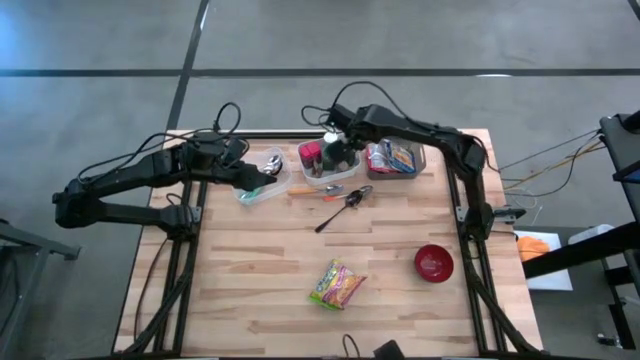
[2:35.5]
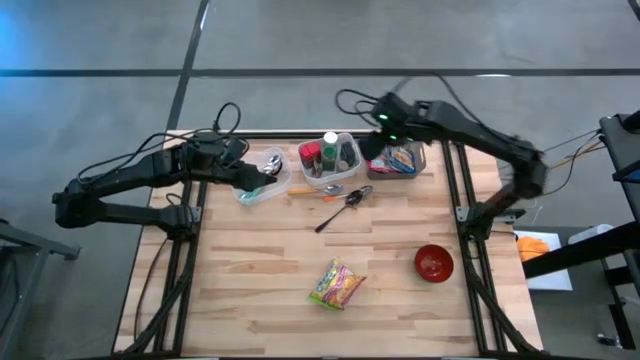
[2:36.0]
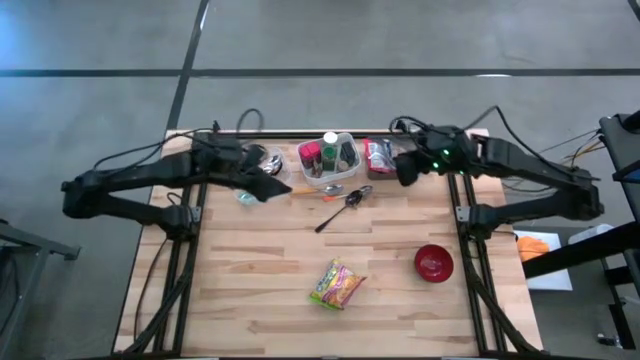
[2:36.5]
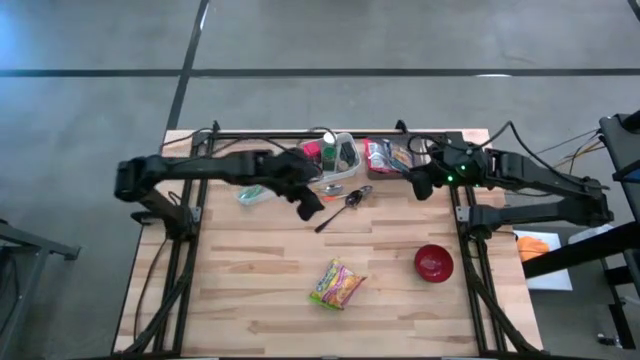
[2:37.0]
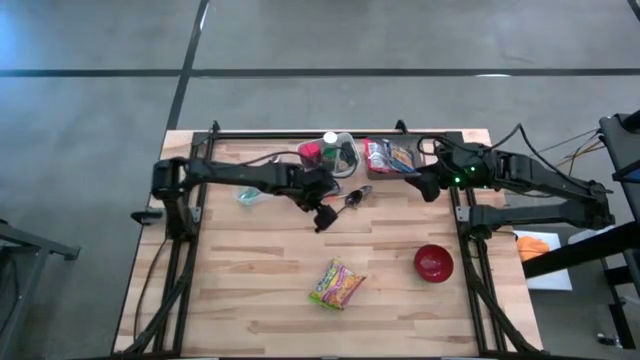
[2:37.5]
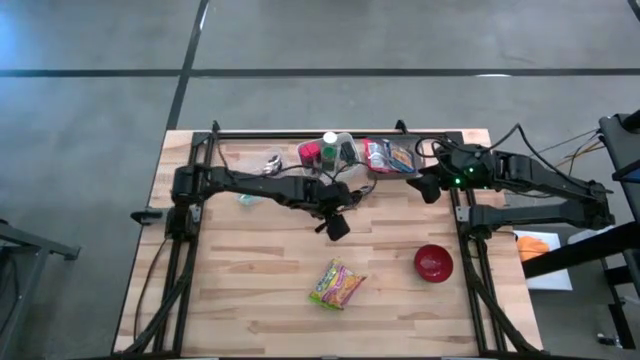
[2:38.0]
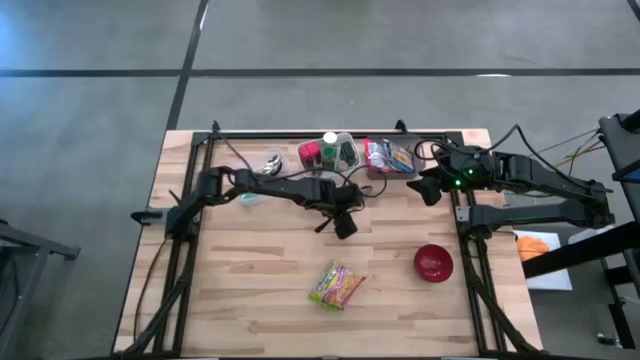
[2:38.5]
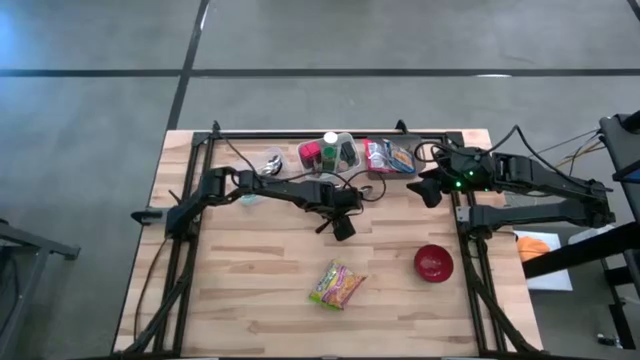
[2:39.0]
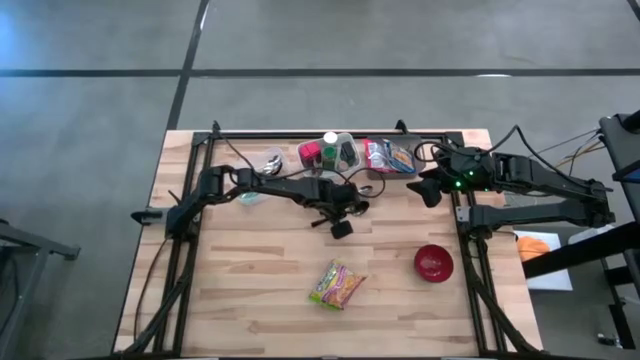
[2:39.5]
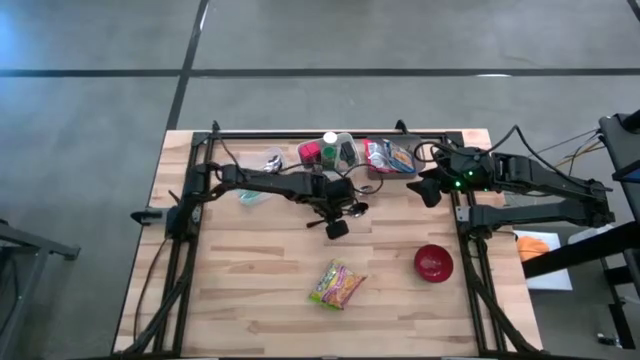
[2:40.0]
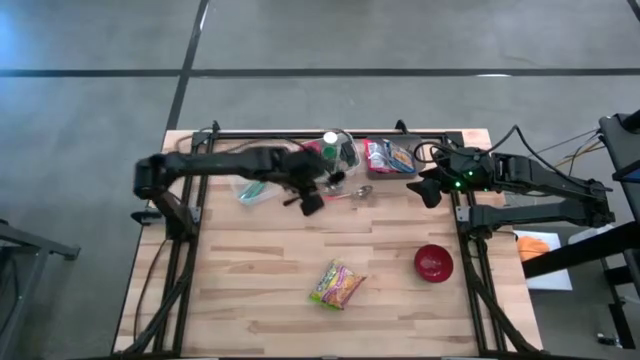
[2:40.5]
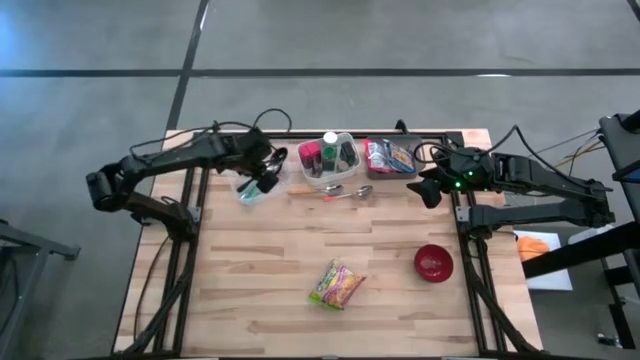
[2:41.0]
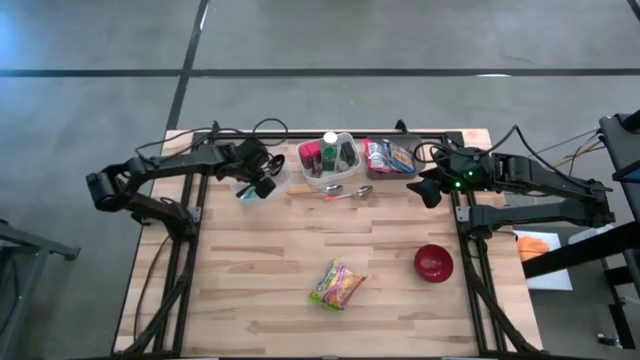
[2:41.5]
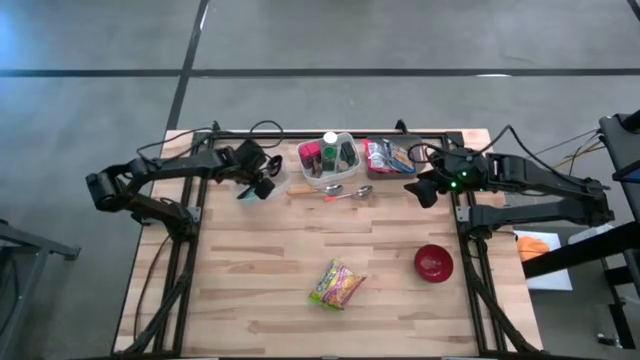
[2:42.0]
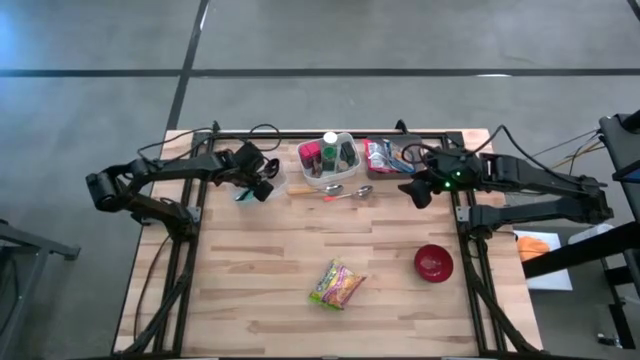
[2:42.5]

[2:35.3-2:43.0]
Put the black spoon into the transparent bin

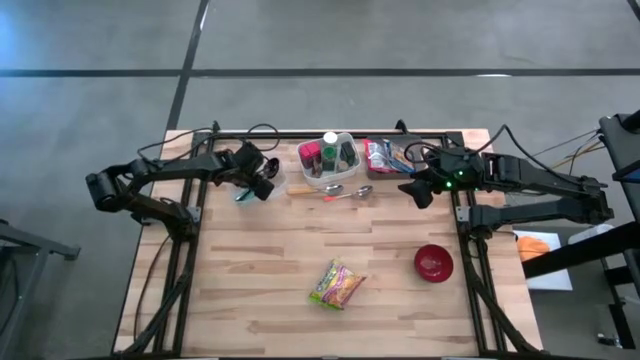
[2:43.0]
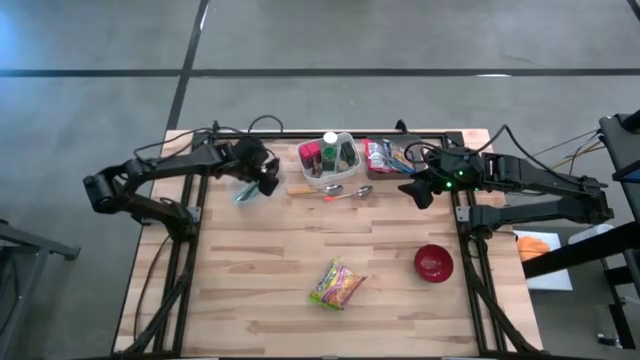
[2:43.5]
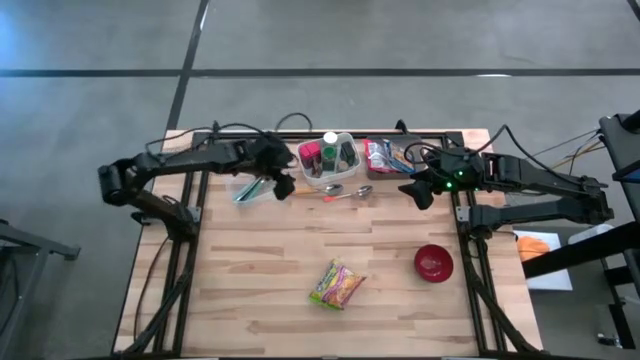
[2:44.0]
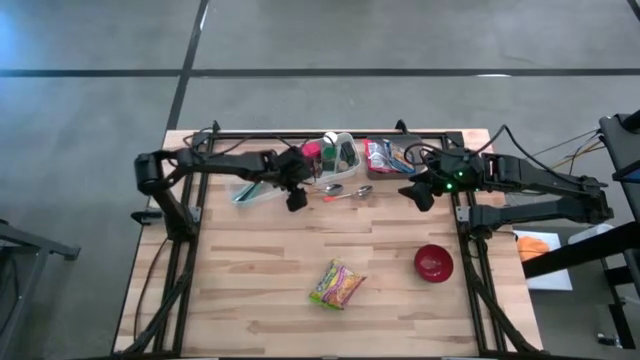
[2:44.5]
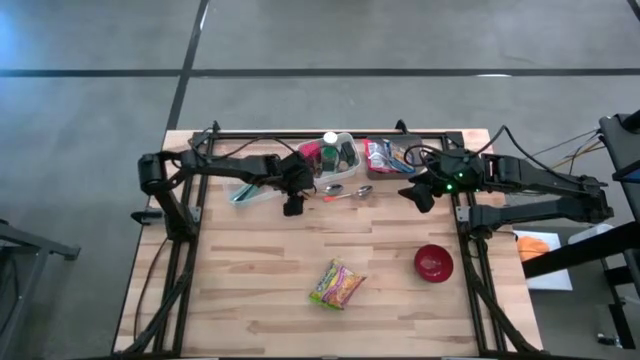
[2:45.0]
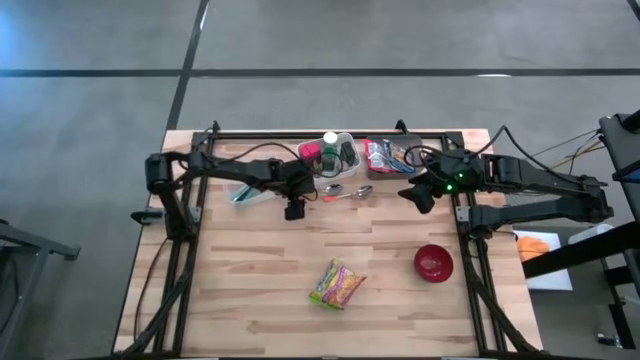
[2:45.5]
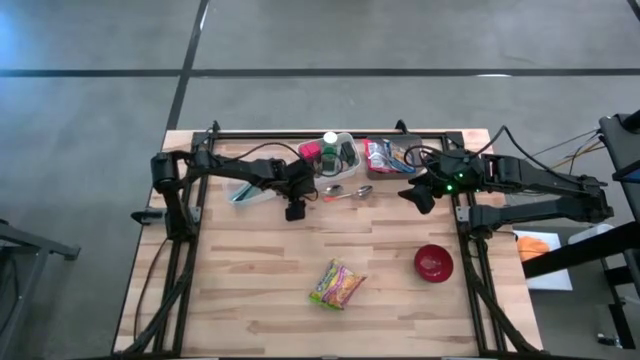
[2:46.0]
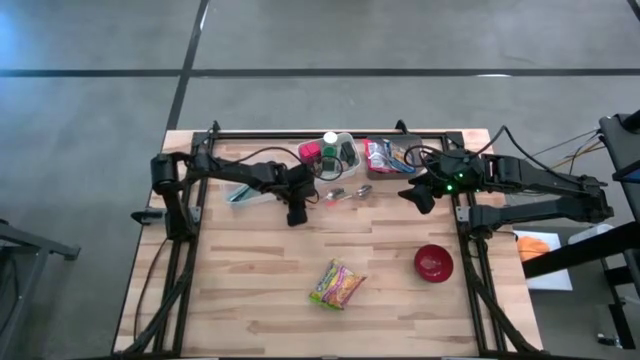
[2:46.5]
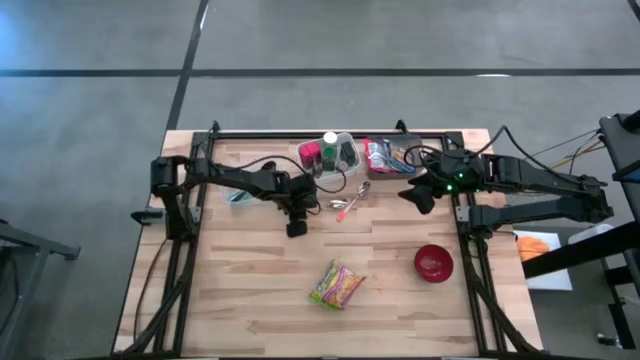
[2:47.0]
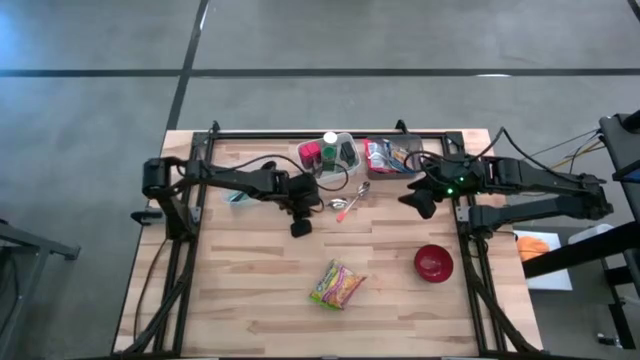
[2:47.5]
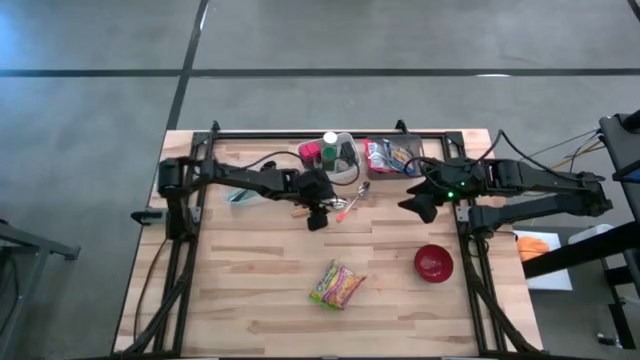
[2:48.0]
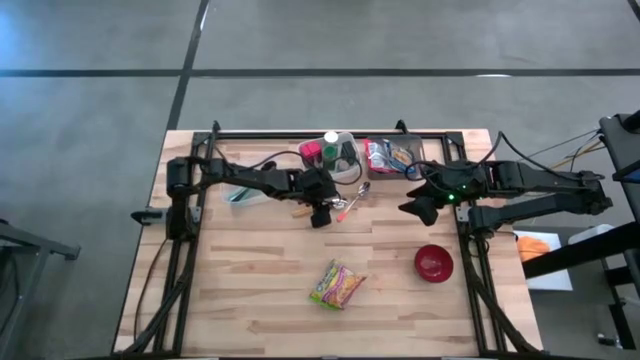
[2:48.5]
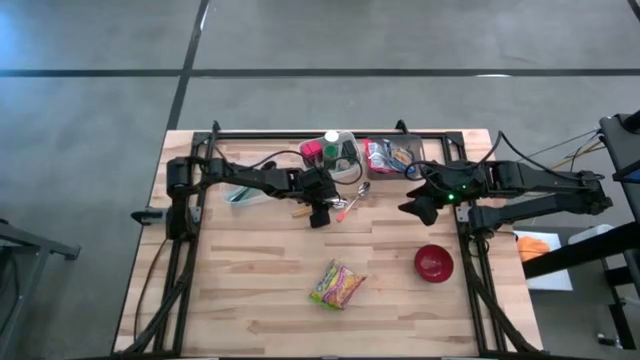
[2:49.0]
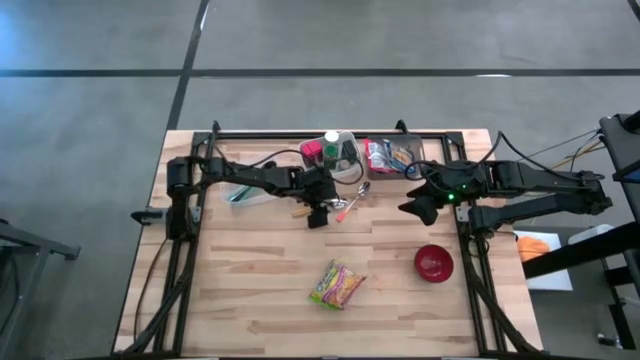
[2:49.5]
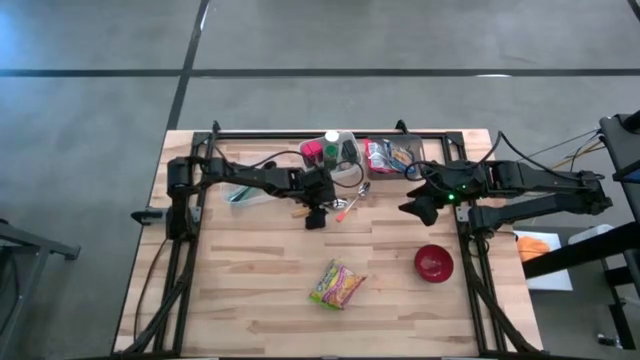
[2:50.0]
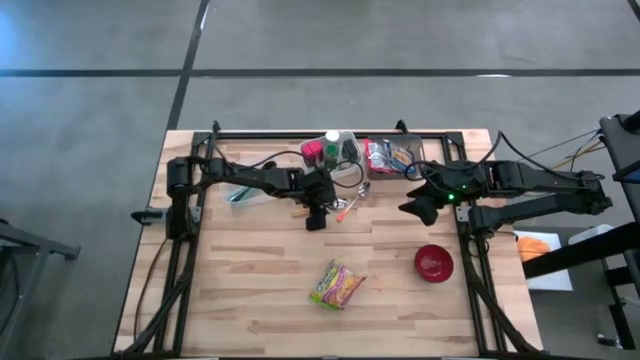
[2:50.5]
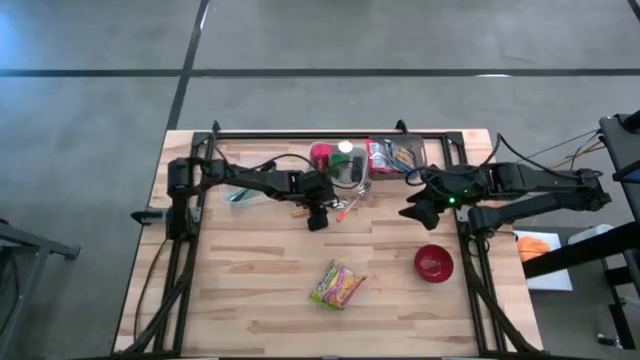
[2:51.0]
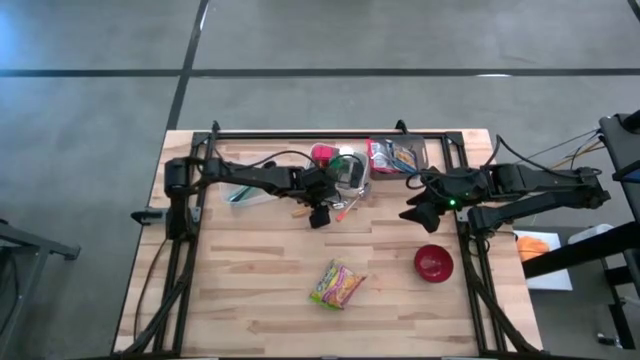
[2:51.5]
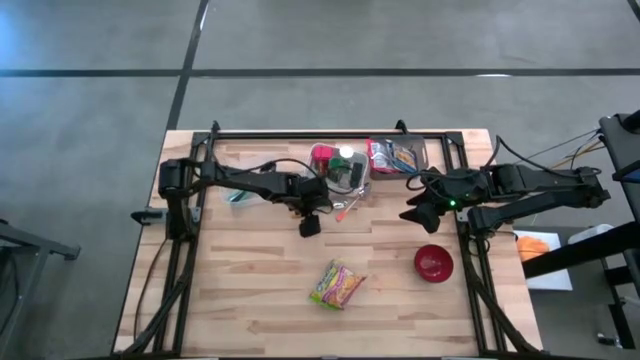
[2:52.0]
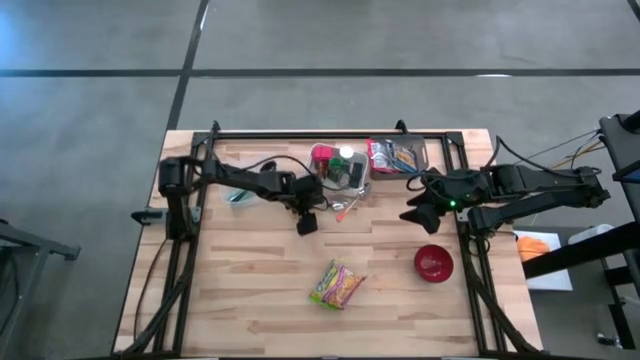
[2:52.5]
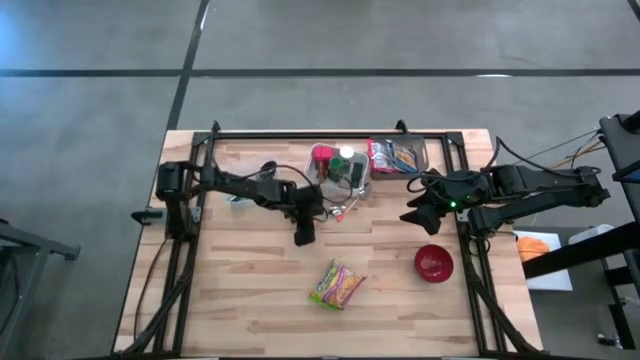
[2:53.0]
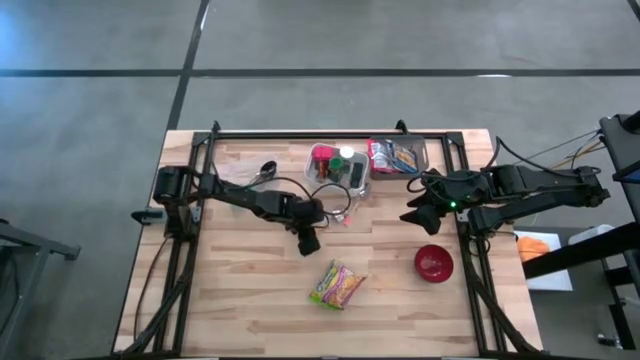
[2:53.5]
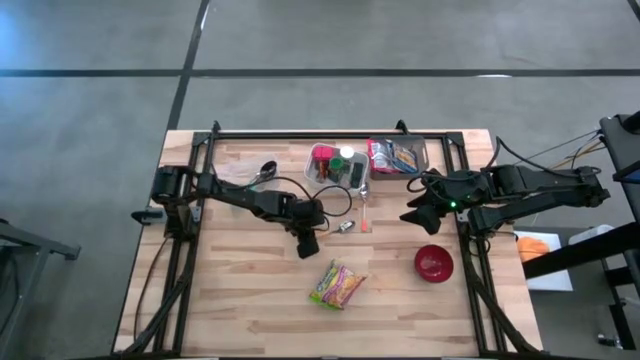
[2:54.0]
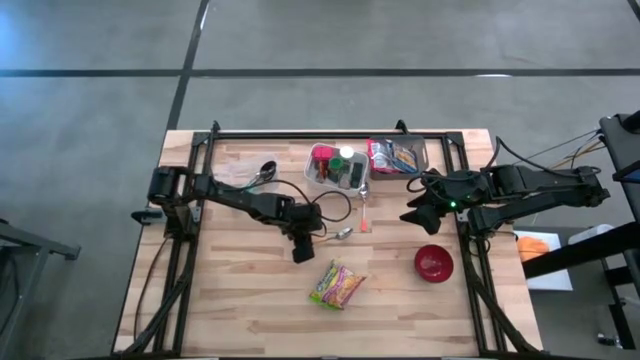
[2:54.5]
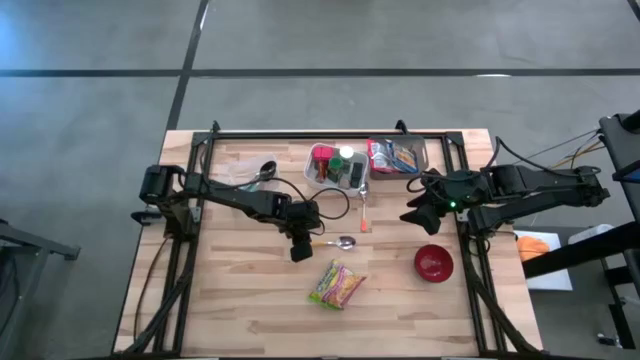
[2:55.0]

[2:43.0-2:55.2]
Put the yellow spoon into the transparent bin

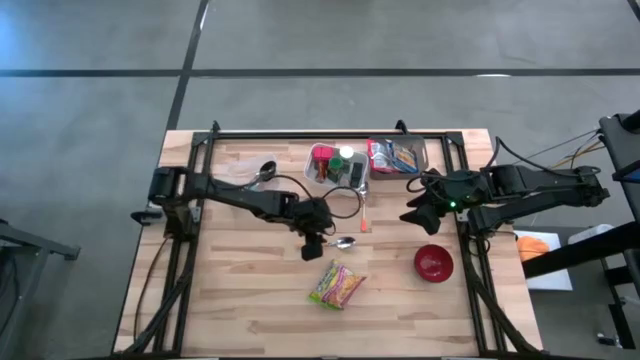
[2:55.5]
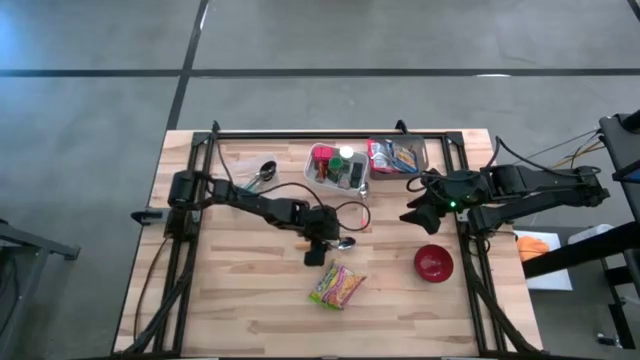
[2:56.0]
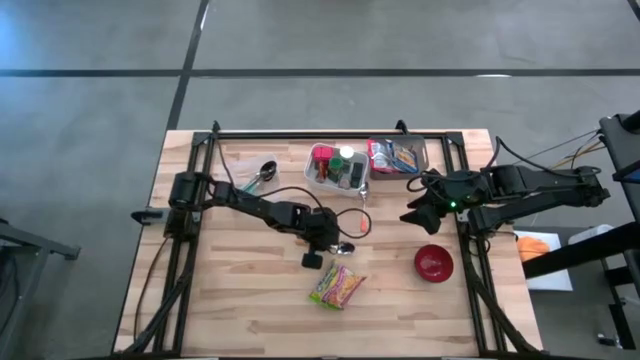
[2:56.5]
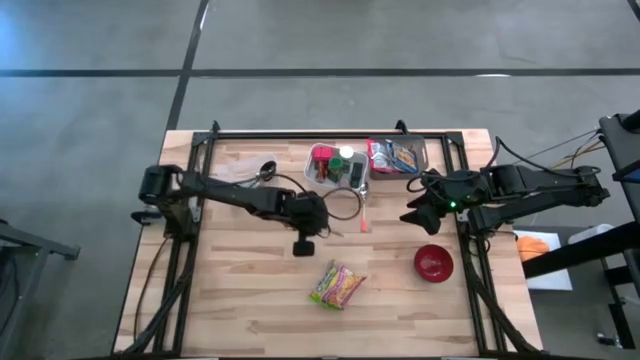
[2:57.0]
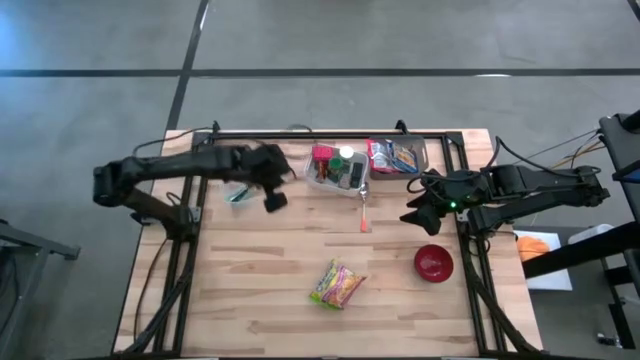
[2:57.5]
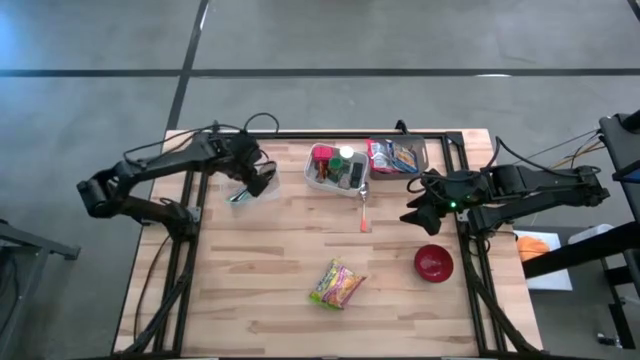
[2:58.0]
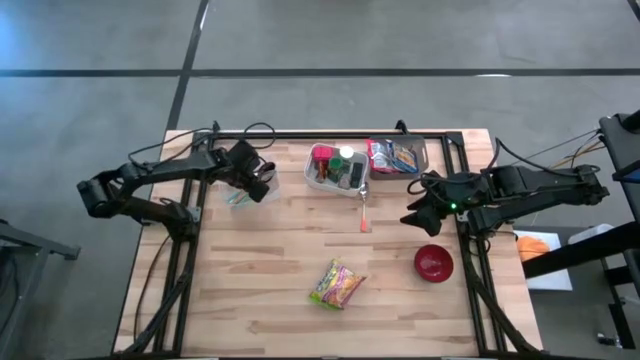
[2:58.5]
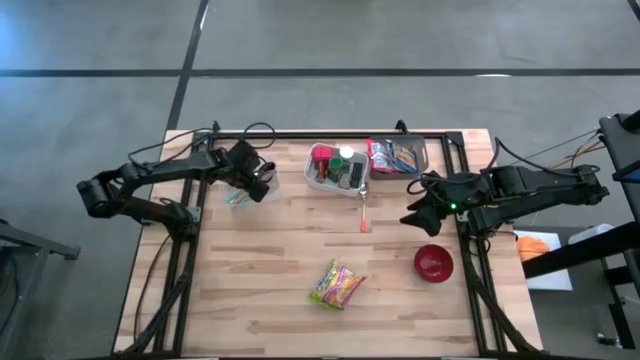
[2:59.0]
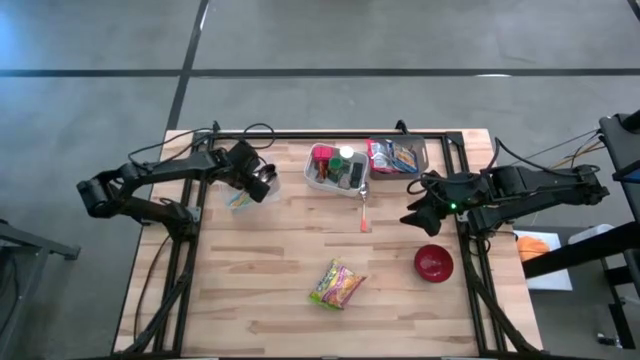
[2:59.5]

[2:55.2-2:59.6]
Put the yellow spoon into the transparent bin
